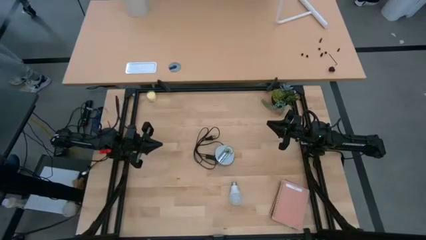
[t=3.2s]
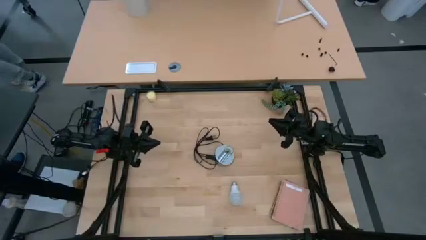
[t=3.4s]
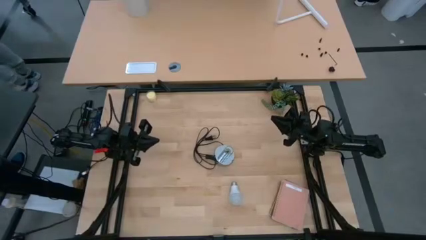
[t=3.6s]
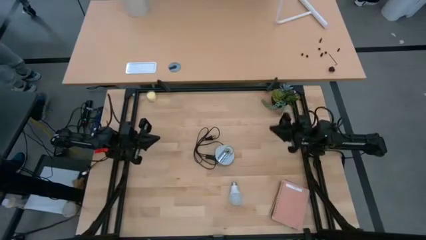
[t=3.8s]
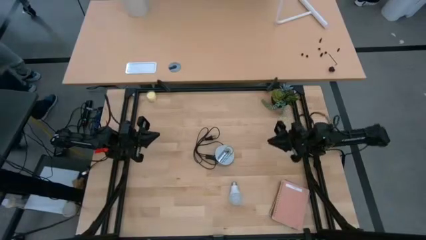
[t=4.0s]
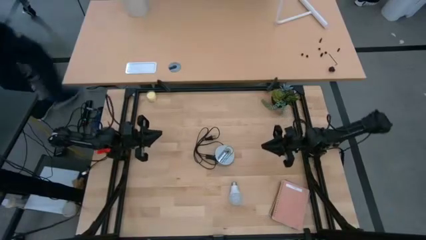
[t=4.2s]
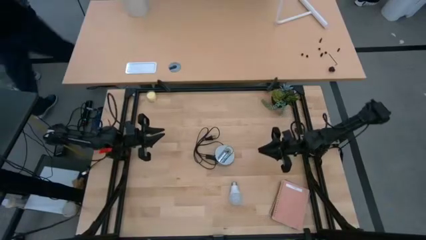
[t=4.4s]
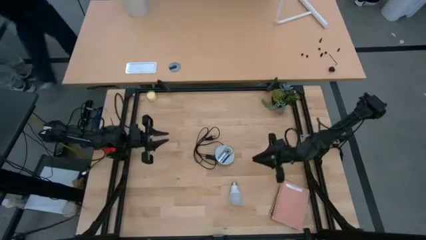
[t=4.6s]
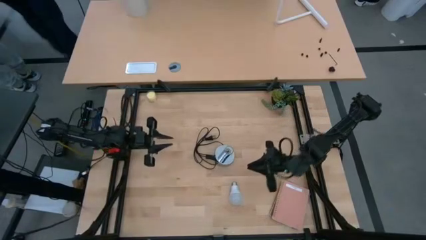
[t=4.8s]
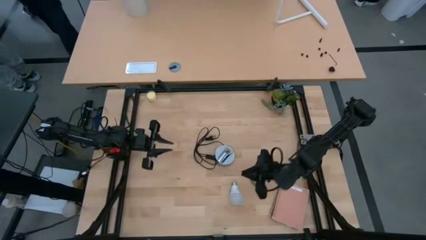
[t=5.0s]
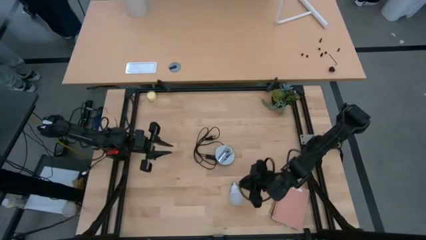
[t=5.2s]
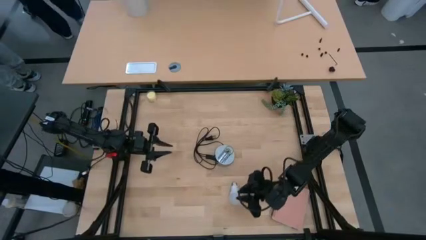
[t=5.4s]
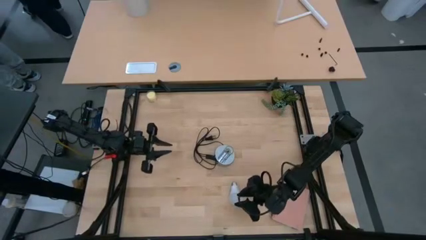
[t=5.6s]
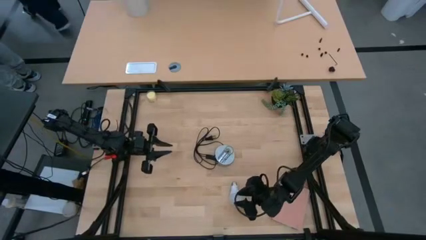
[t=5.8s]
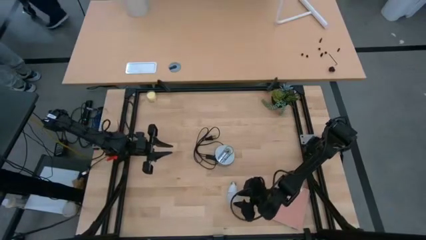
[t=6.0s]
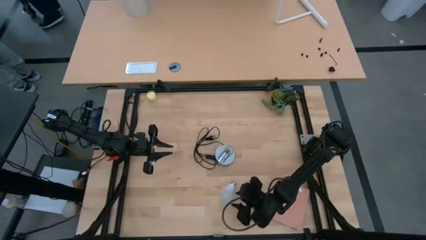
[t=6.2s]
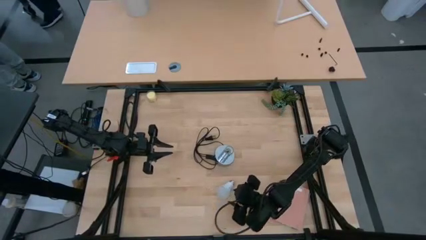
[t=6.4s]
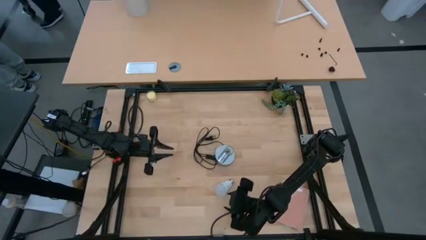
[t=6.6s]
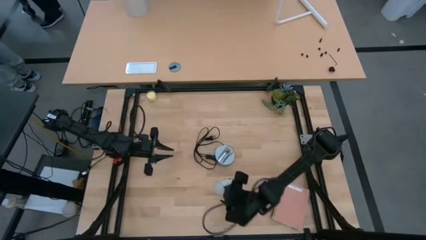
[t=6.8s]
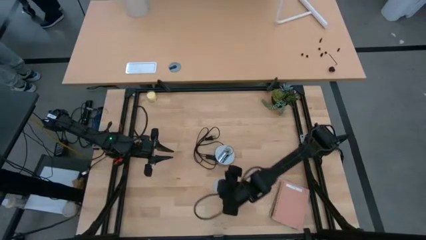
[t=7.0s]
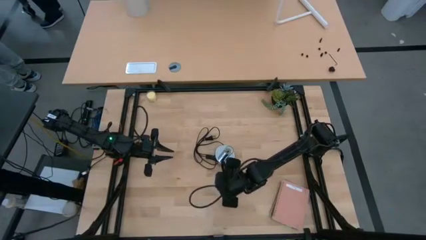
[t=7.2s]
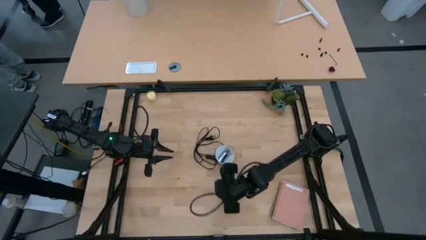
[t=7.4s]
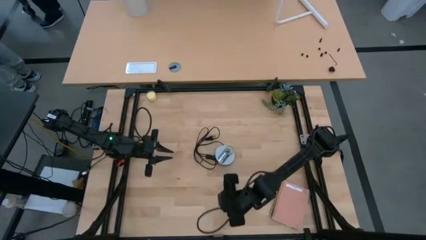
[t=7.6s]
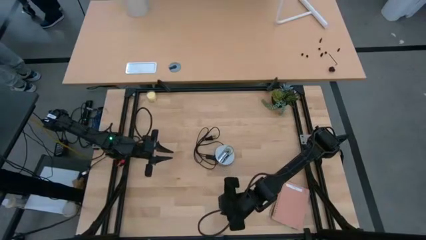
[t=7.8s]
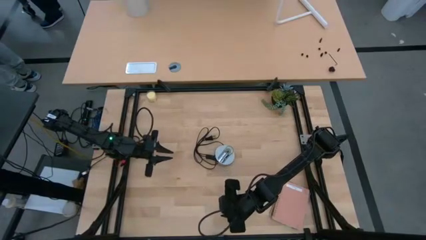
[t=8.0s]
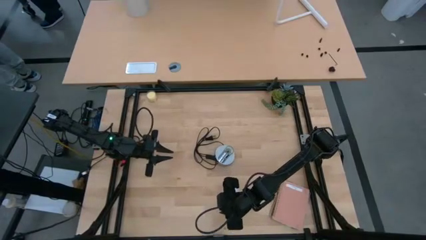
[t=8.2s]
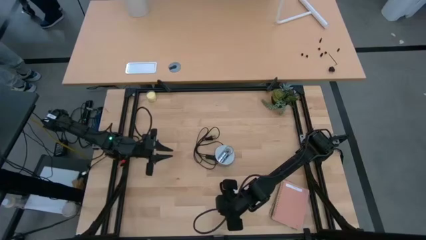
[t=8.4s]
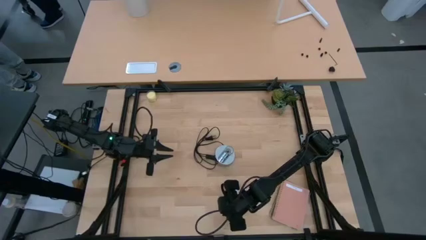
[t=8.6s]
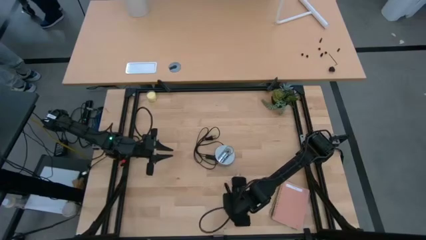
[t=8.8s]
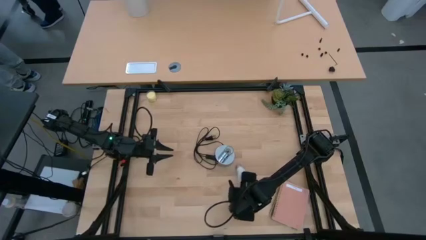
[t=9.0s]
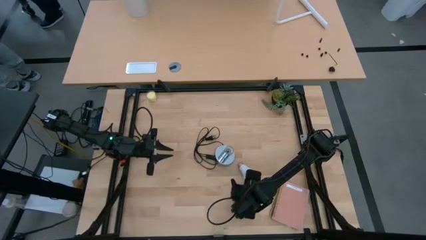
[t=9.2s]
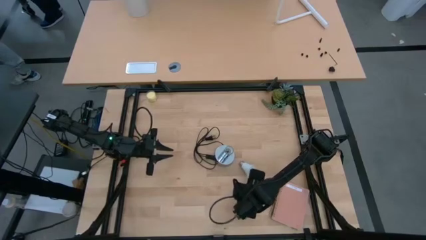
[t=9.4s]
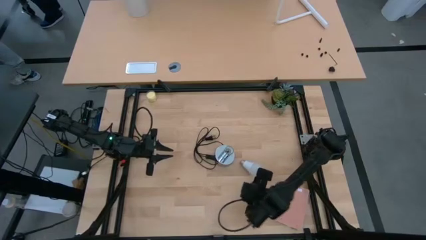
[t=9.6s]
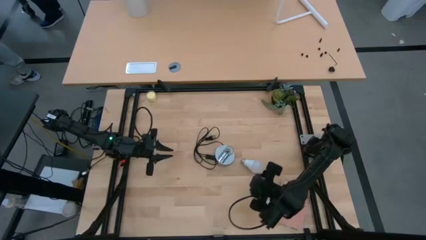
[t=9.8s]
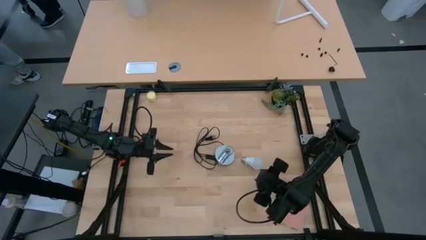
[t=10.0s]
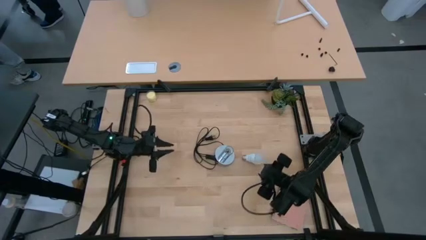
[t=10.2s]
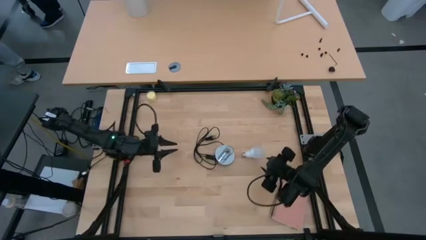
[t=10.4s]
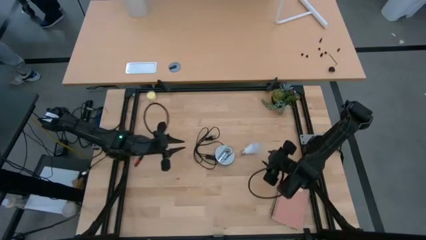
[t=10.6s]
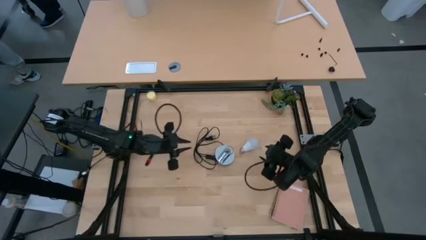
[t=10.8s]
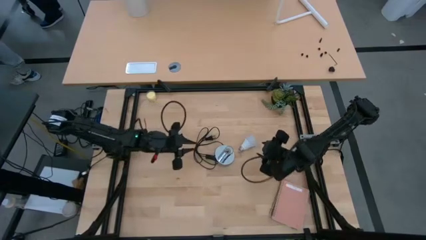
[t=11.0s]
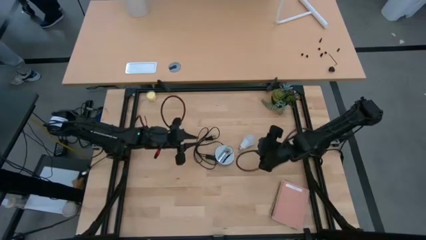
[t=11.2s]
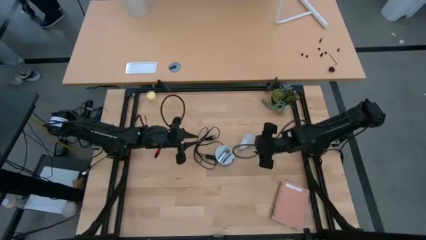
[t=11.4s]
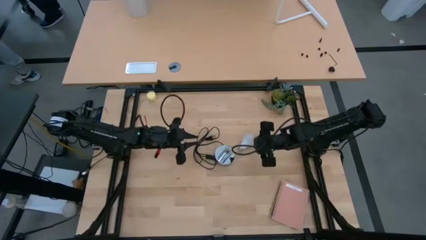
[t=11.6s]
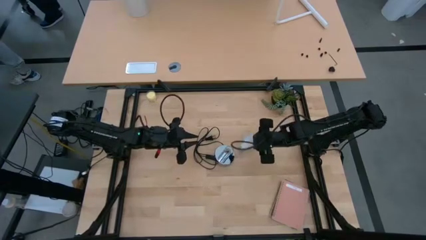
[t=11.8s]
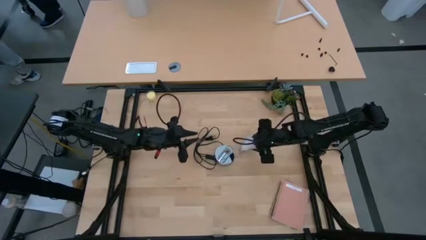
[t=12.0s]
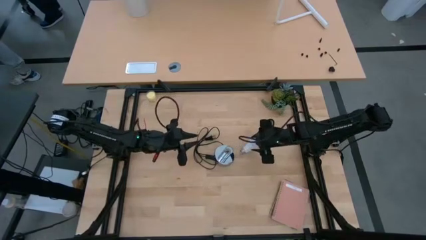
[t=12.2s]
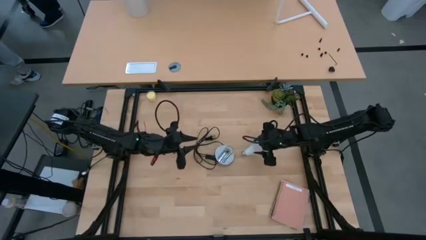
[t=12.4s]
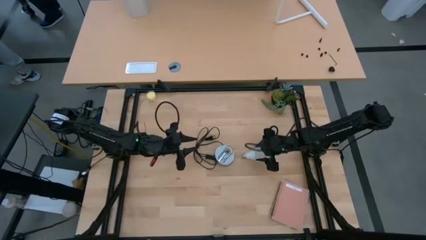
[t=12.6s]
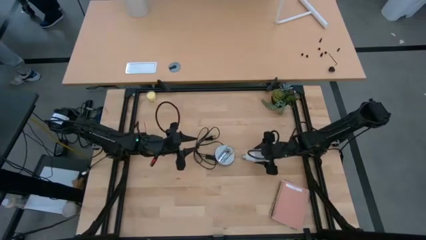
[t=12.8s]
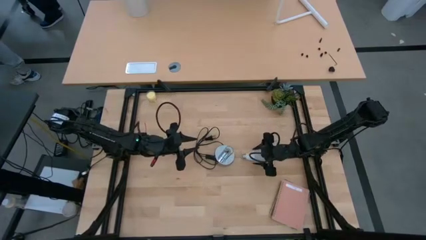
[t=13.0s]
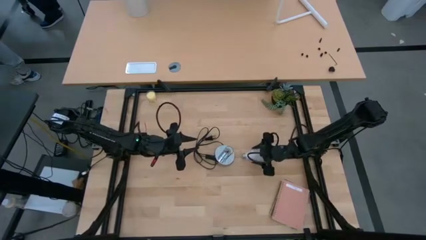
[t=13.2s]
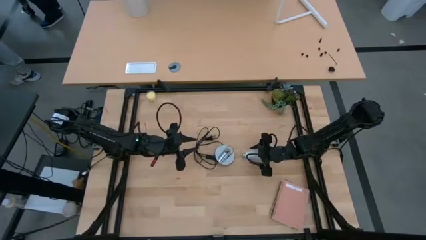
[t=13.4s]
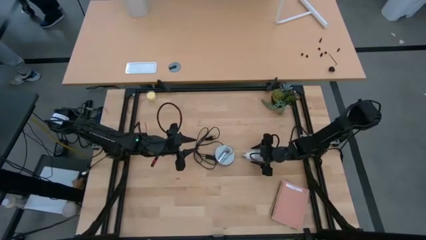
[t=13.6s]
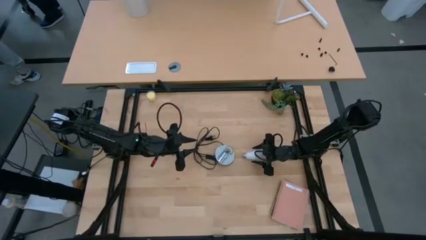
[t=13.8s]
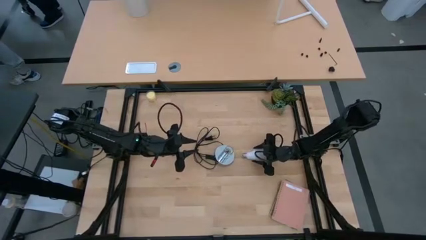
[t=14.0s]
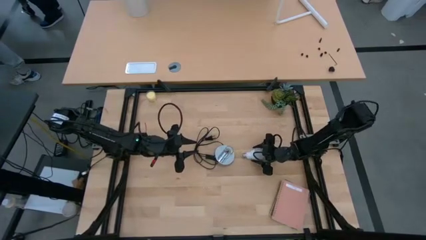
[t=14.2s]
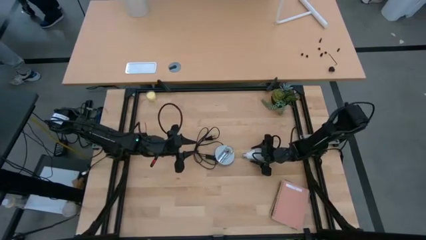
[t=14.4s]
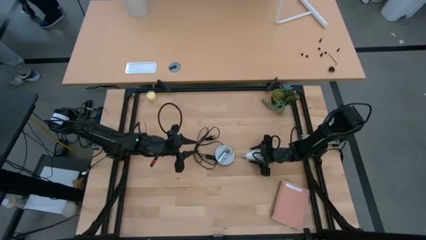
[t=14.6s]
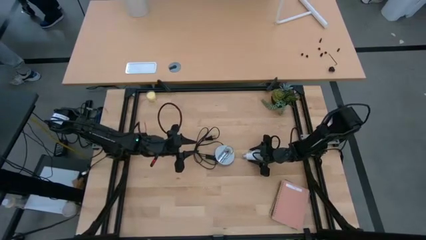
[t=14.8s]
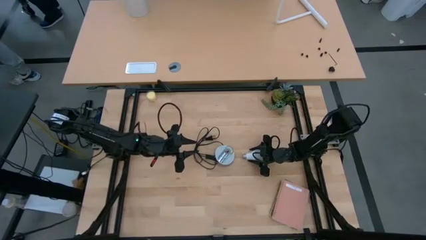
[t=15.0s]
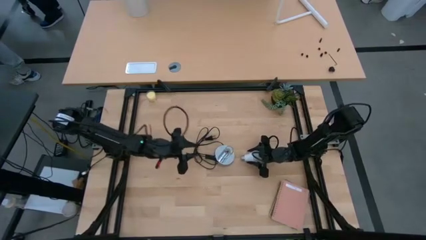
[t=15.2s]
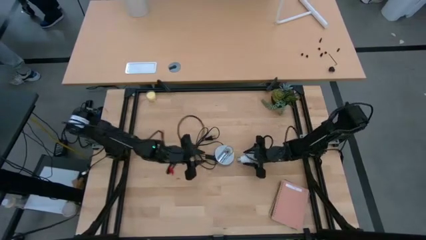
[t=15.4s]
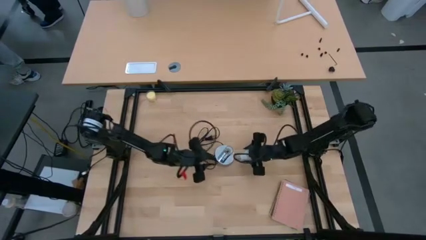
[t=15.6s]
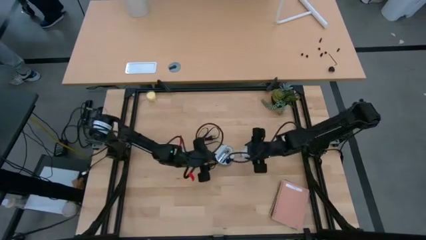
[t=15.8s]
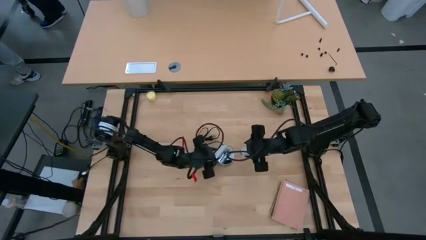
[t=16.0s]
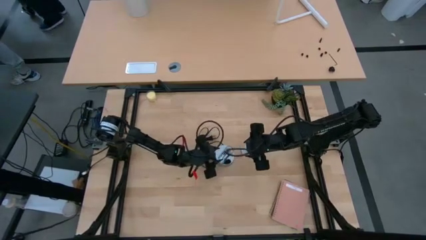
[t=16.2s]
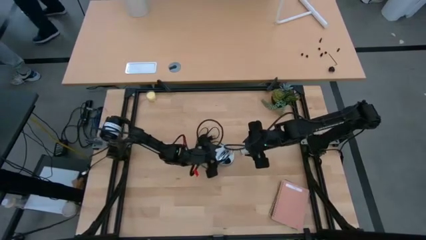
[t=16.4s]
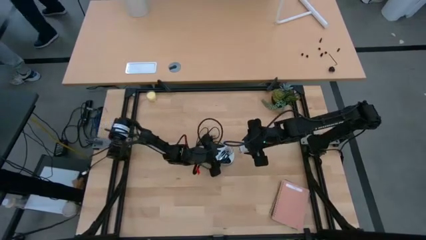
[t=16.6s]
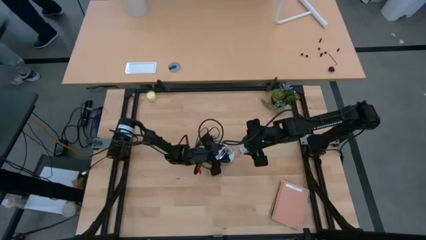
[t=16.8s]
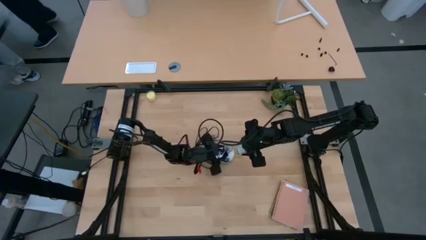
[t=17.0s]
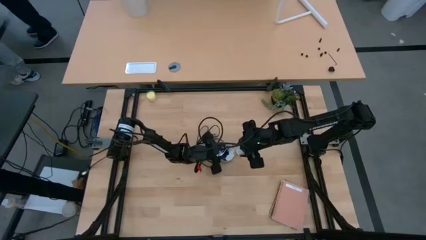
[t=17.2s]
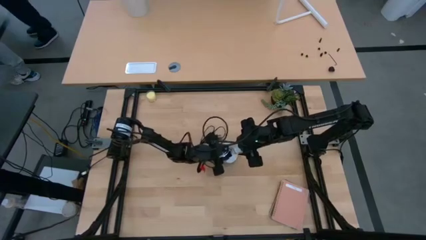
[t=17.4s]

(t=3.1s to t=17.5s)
Task: Screw lightbulb
Insert the light bulb into the lamp
